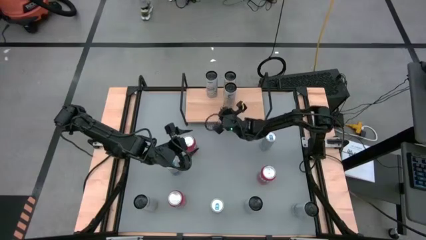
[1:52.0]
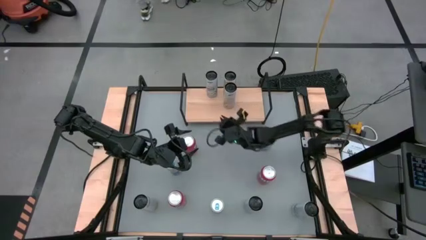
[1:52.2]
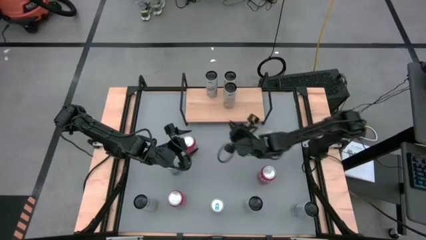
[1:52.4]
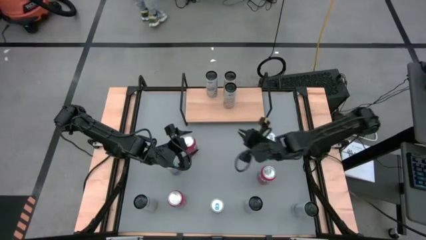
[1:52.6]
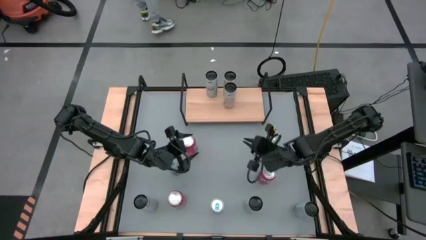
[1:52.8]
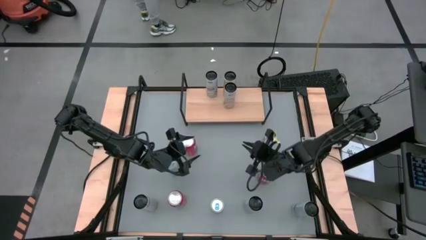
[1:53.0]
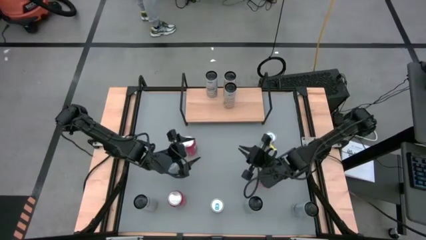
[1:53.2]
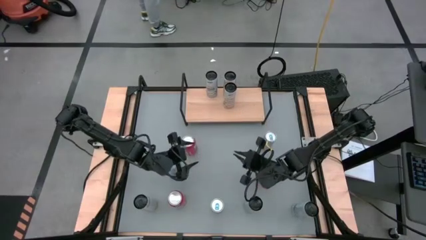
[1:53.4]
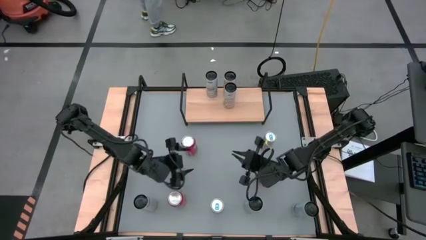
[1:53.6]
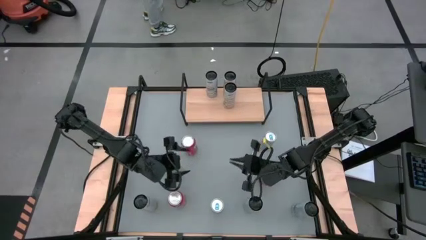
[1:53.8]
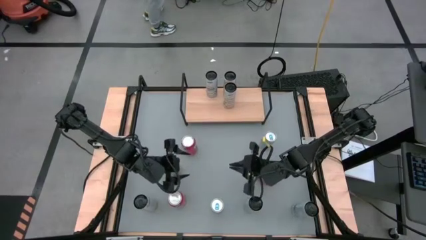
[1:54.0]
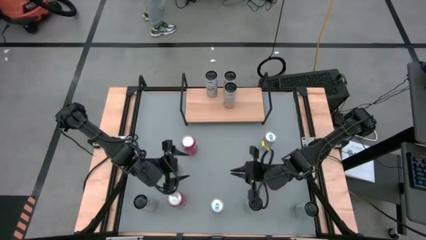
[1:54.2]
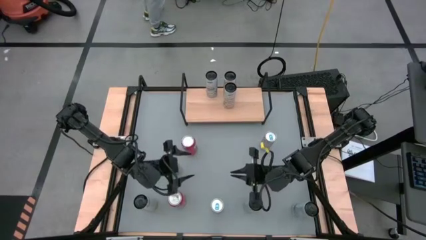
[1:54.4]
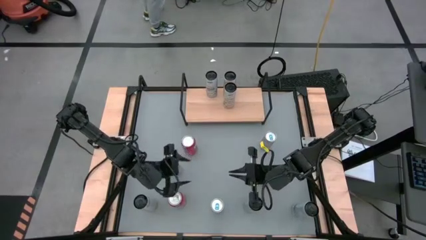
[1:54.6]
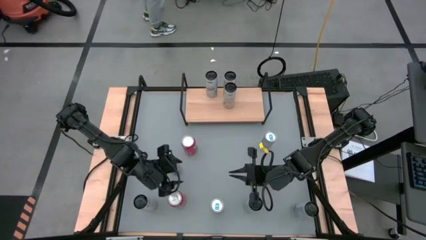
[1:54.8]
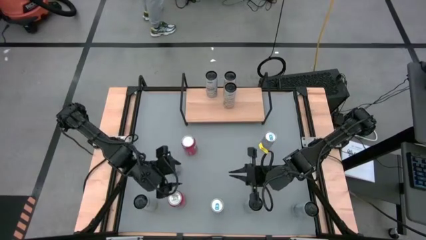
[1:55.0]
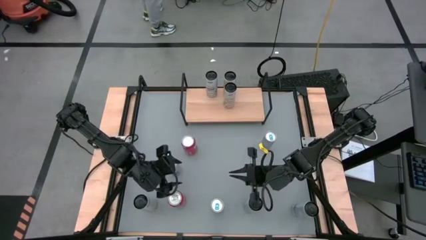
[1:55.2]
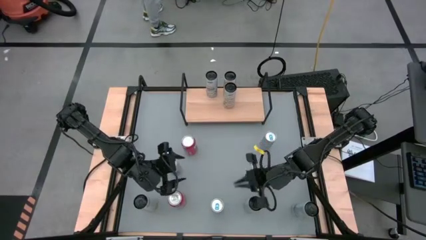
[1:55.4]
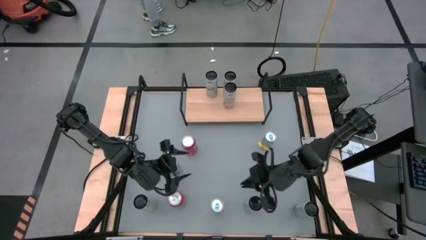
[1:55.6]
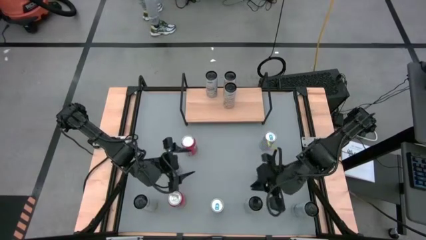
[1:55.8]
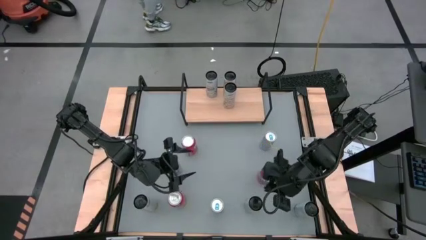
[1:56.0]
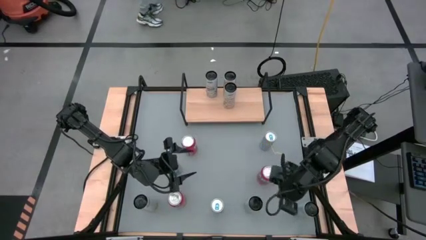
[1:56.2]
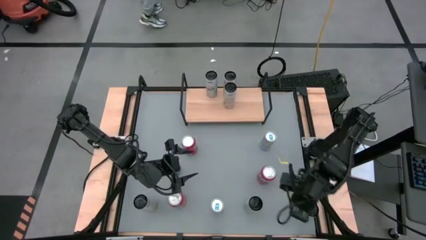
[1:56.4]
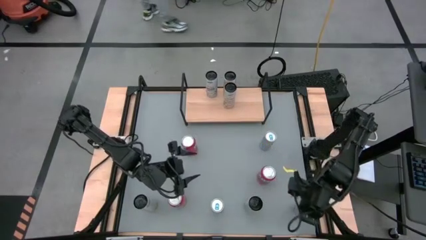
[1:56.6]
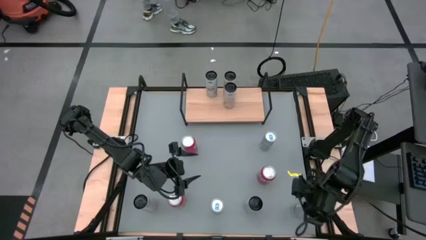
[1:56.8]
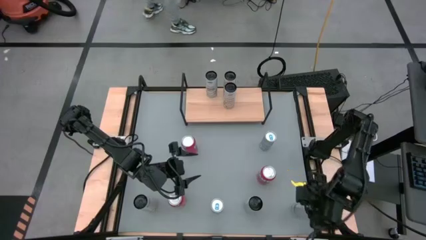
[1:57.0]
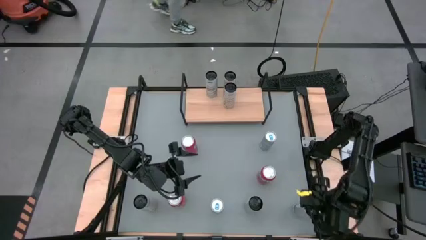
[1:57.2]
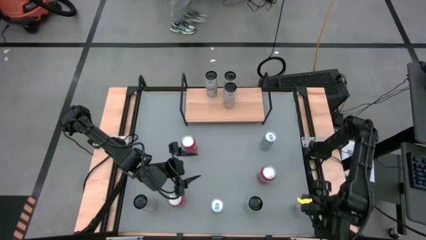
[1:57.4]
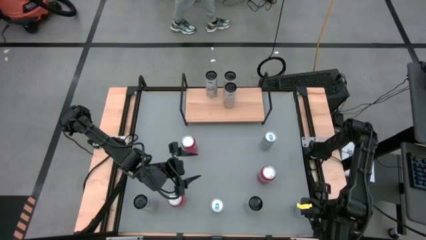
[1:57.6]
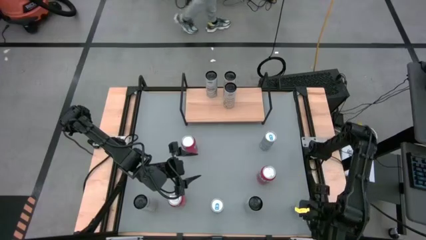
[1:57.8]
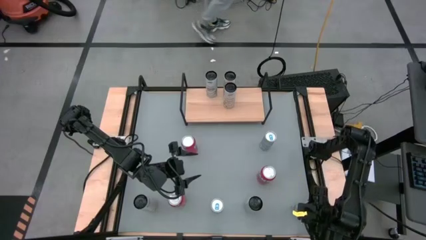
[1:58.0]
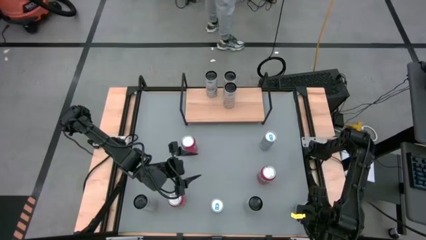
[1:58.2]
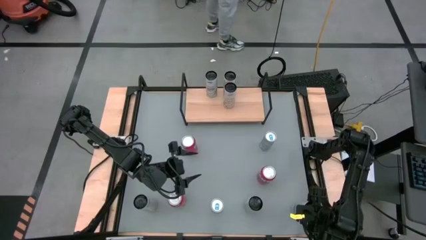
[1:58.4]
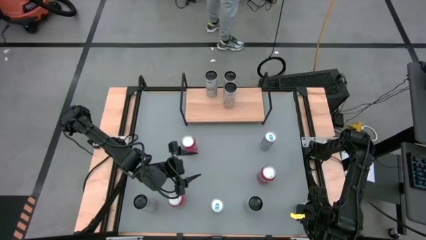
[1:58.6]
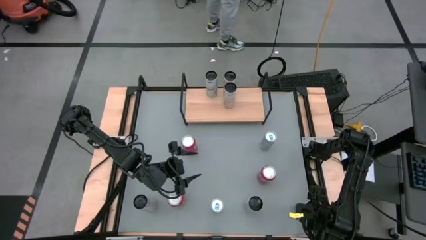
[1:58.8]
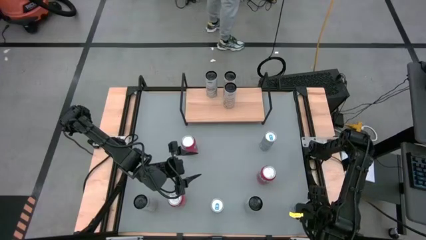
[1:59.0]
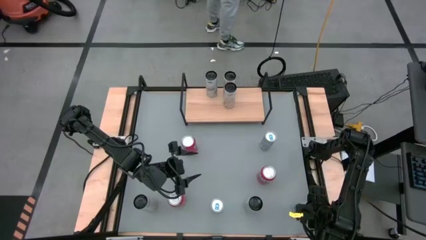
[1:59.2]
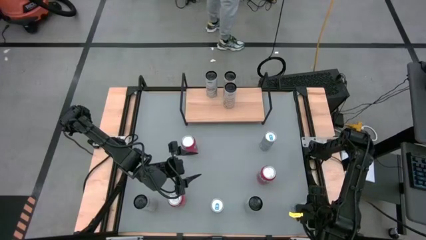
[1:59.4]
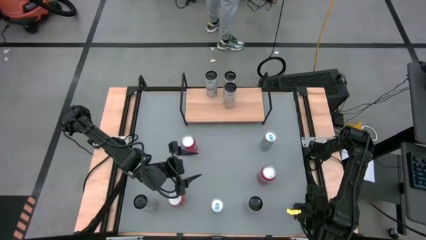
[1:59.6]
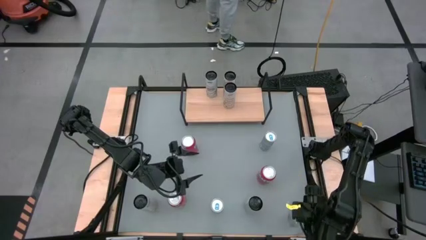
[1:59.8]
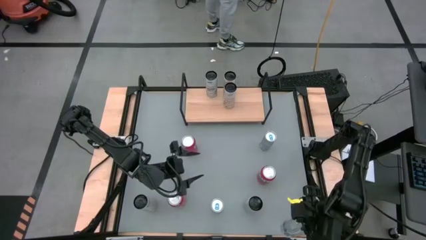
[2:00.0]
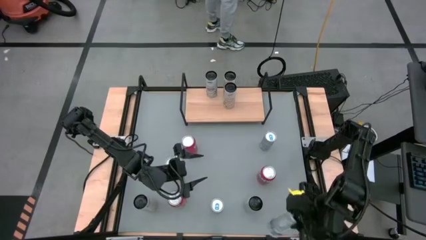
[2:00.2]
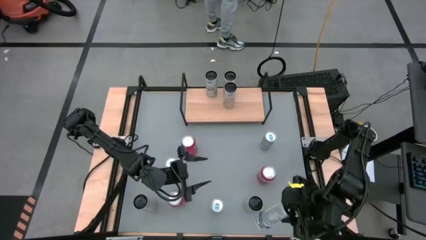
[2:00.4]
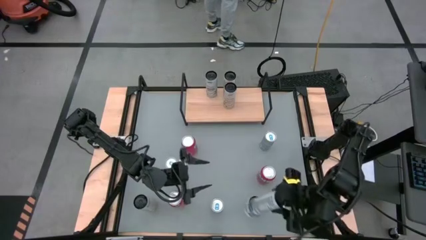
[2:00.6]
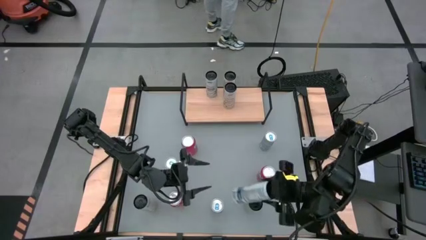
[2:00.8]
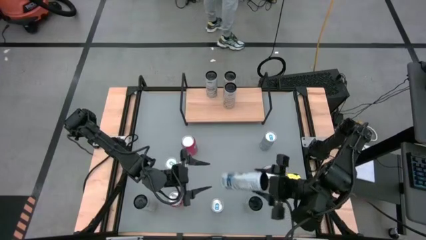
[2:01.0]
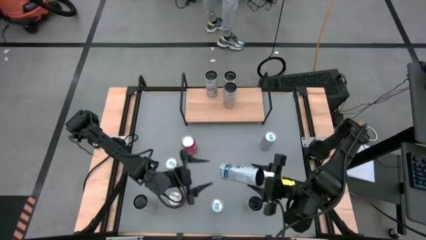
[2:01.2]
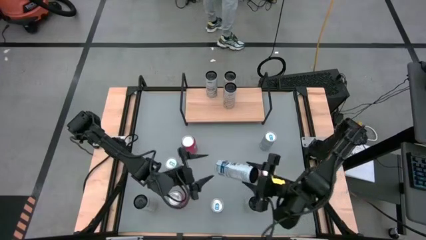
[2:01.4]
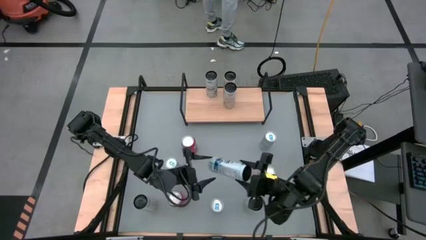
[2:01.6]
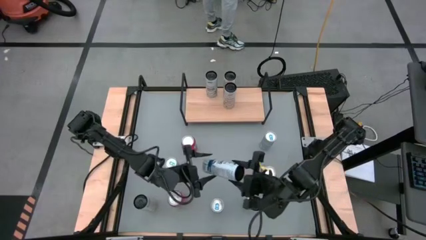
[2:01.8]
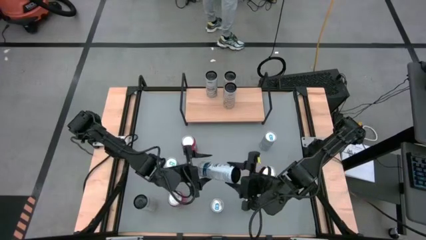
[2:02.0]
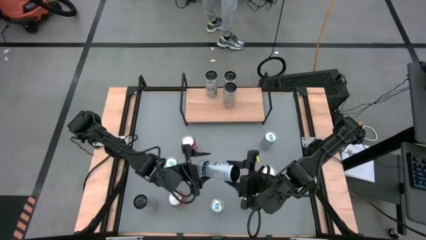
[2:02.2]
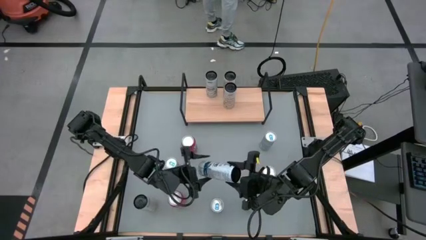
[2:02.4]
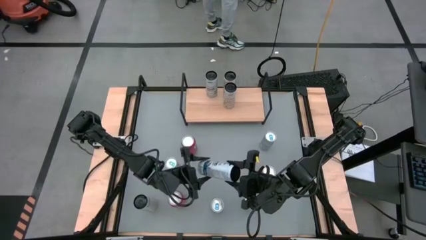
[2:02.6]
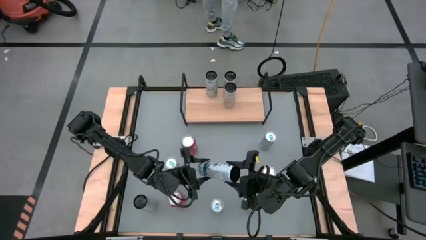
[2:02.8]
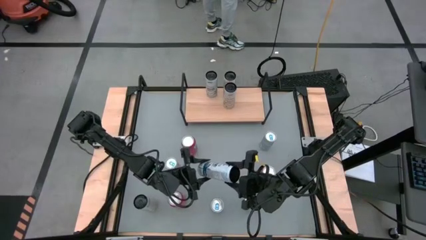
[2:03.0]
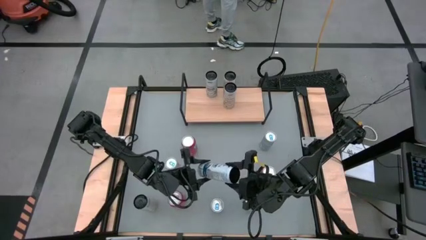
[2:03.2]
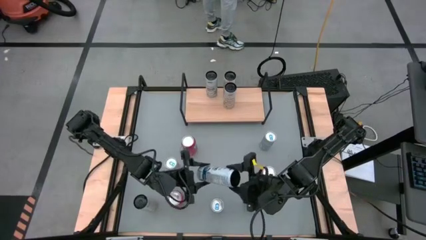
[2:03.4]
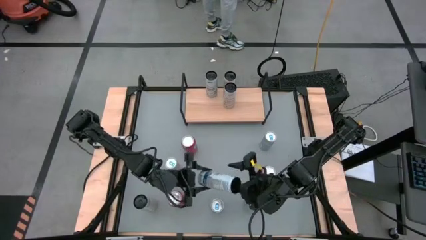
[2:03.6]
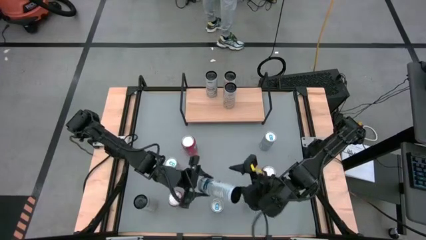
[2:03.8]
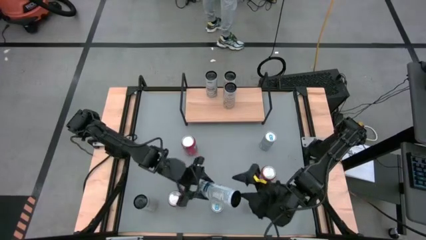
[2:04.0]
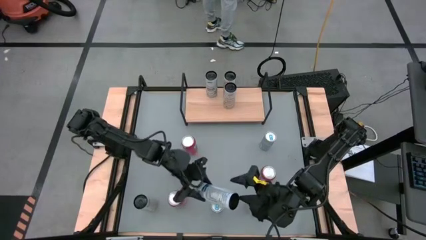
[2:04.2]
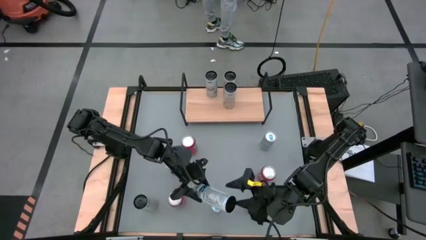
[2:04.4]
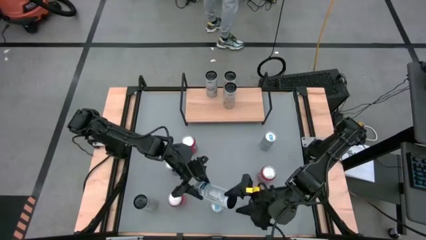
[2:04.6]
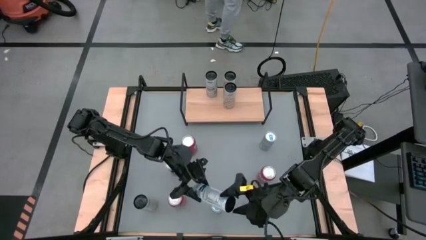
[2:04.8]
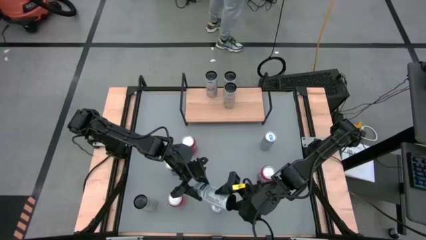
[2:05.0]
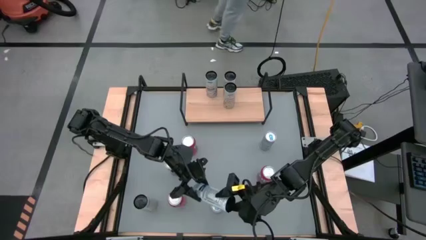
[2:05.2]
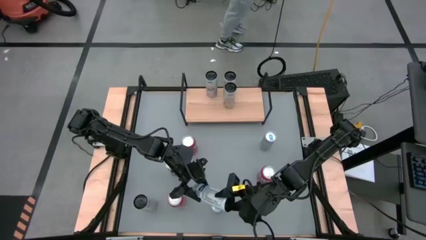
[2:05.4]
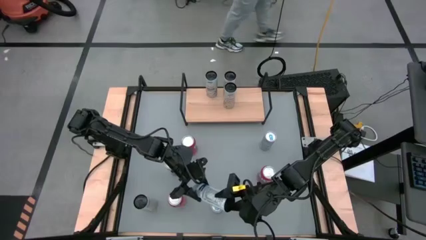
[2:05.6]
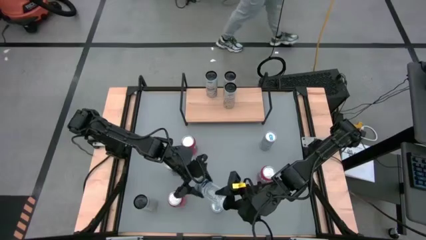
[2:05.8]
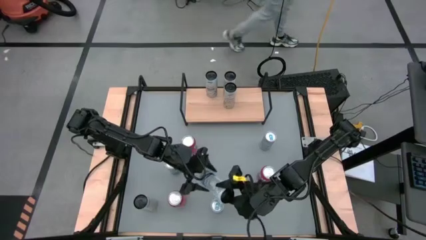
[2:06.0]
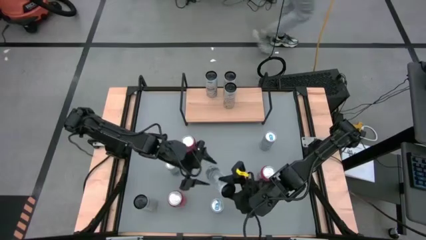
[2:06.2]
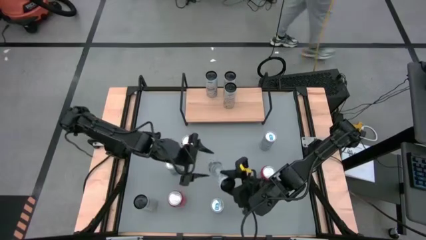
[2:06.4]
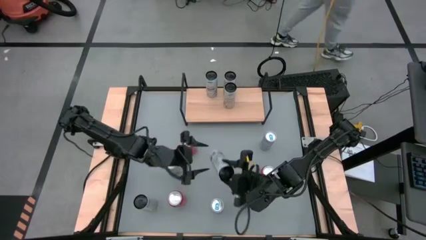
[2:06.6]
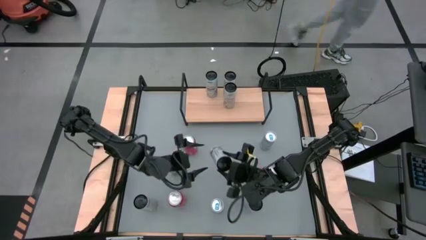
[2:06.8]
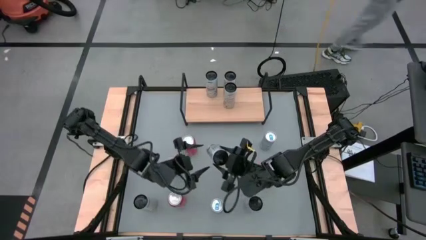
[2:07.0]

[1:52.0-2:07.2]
Task: Place canned beverage on shelf
Put the right white blue soda can aligned with the other white blue soda can on the shelf
